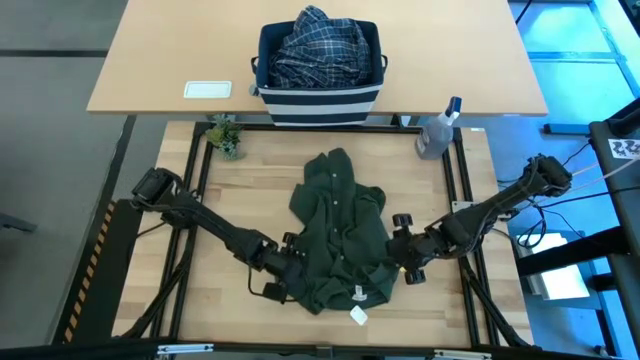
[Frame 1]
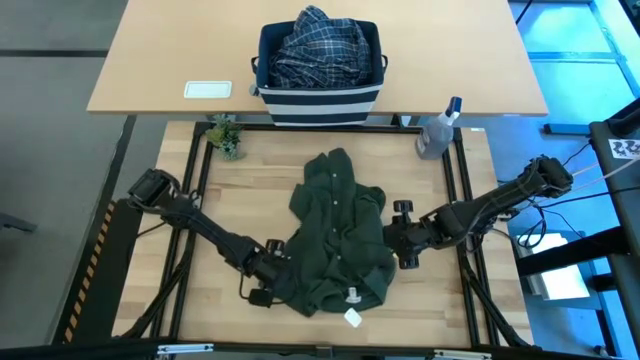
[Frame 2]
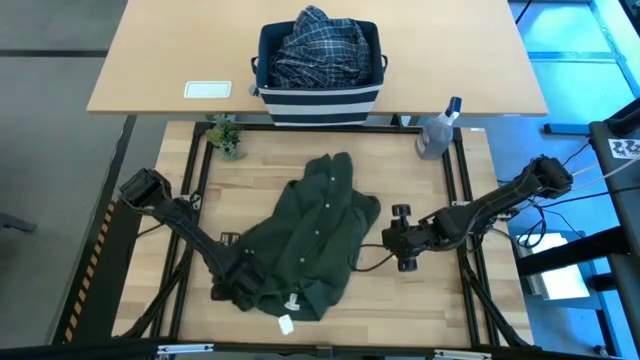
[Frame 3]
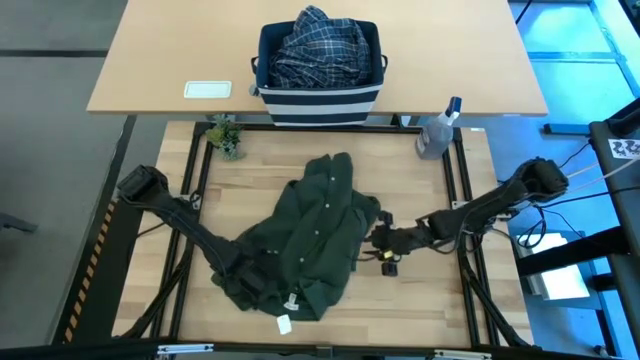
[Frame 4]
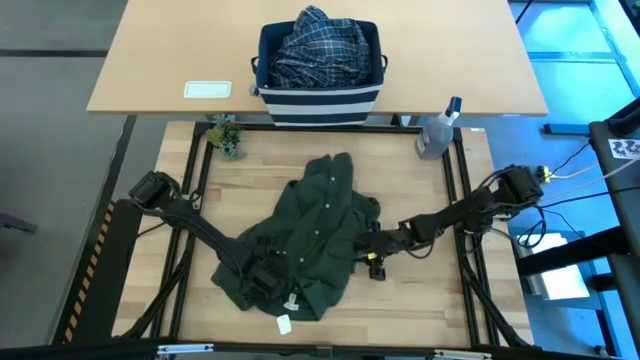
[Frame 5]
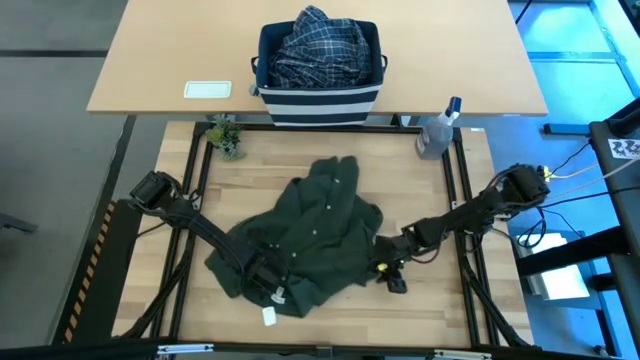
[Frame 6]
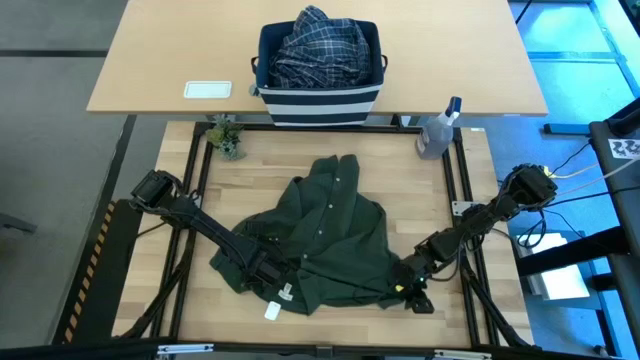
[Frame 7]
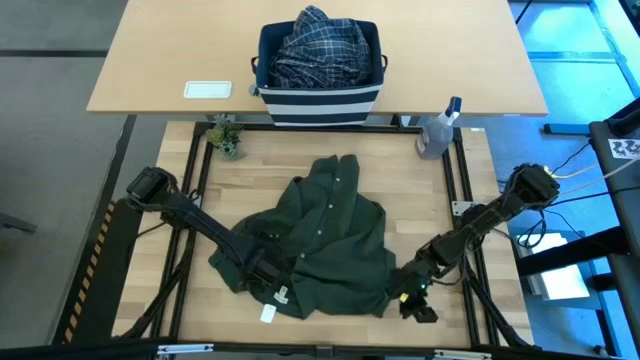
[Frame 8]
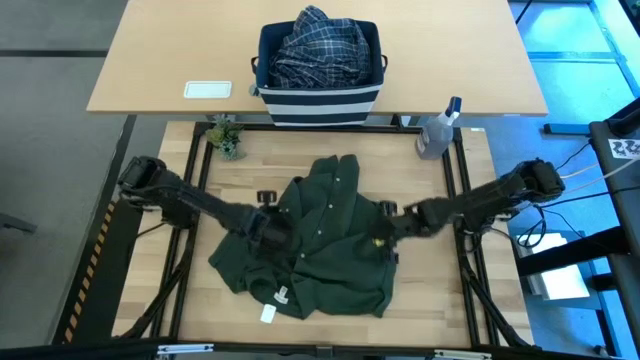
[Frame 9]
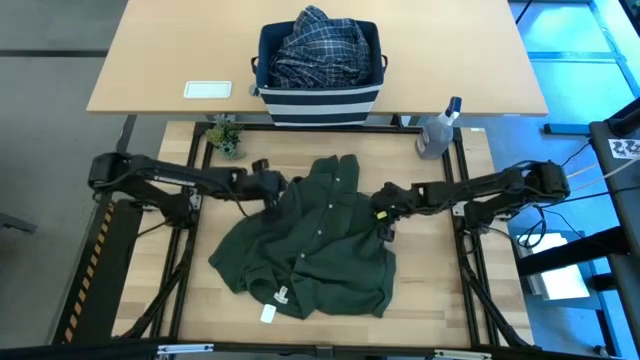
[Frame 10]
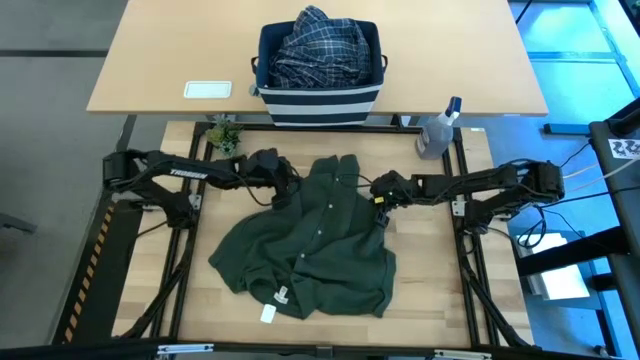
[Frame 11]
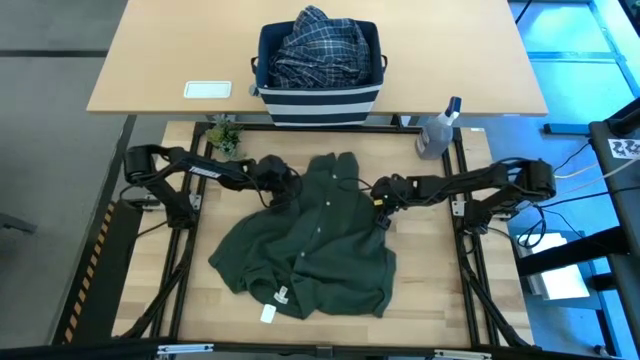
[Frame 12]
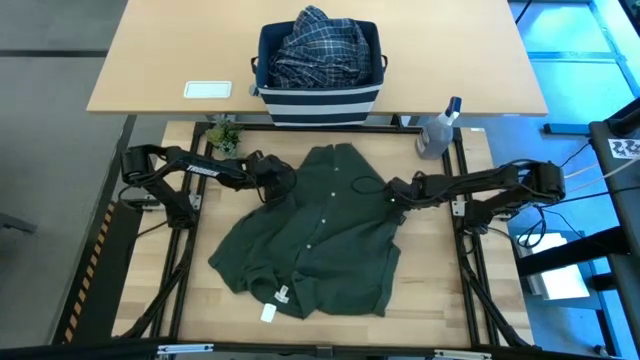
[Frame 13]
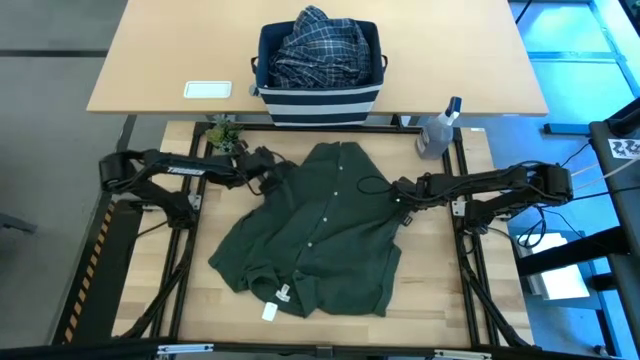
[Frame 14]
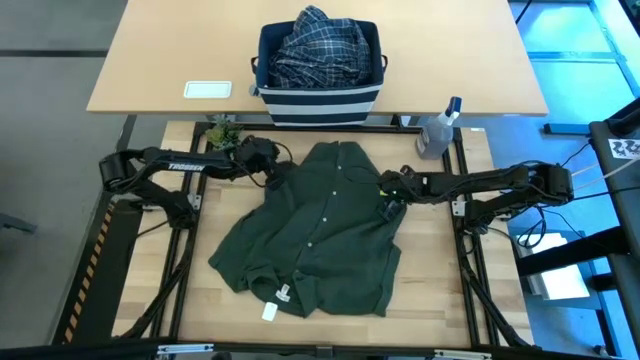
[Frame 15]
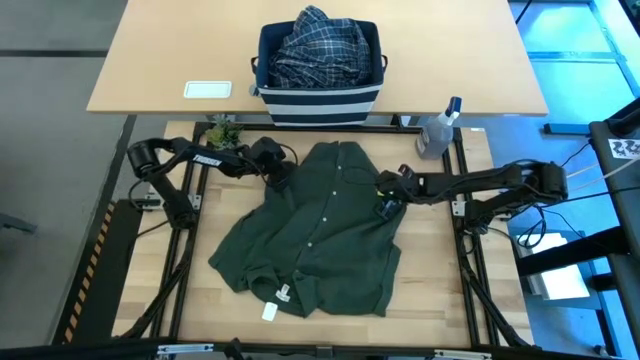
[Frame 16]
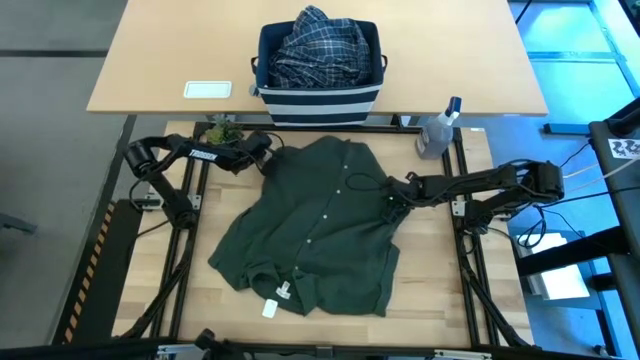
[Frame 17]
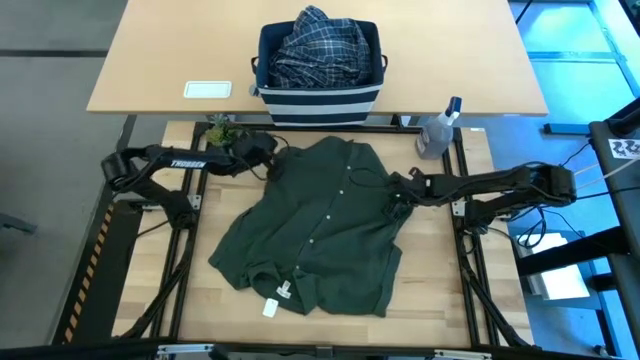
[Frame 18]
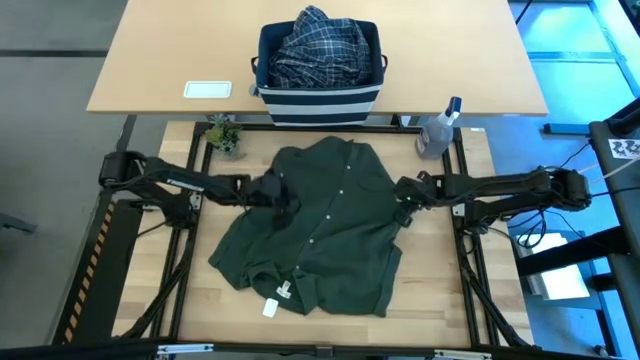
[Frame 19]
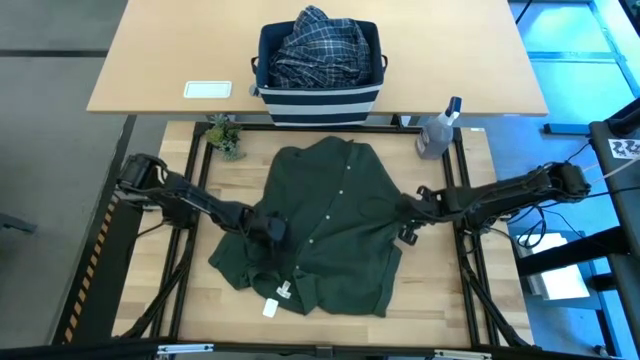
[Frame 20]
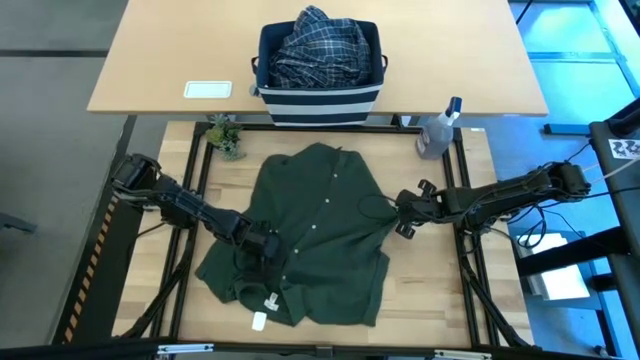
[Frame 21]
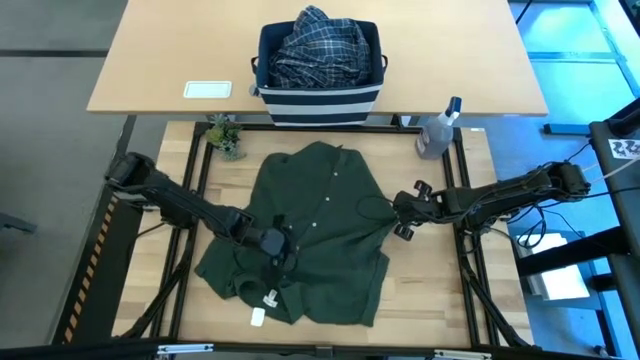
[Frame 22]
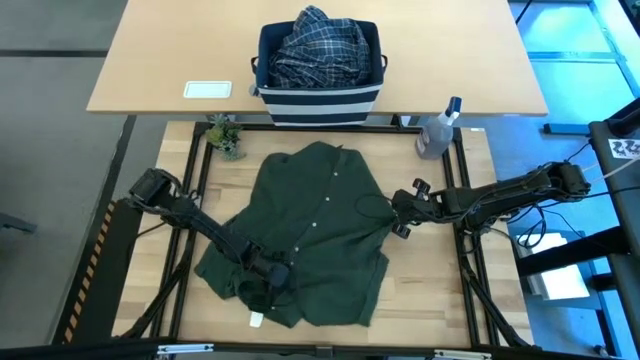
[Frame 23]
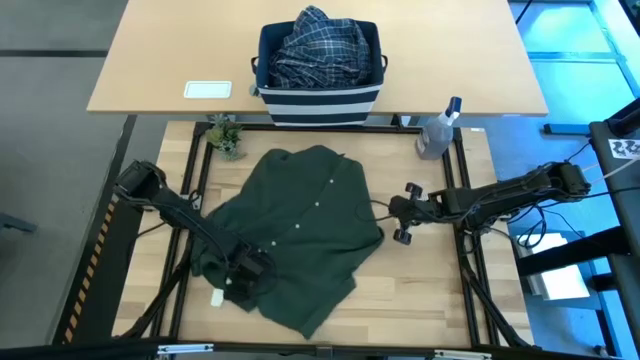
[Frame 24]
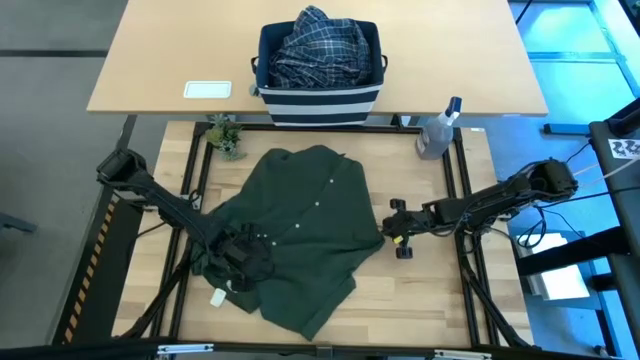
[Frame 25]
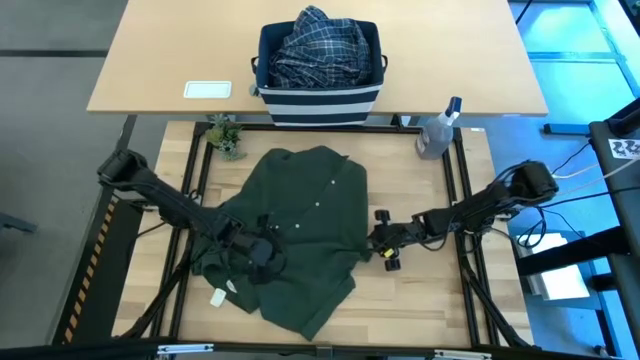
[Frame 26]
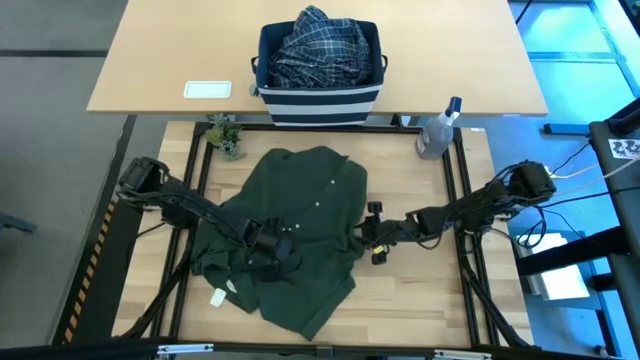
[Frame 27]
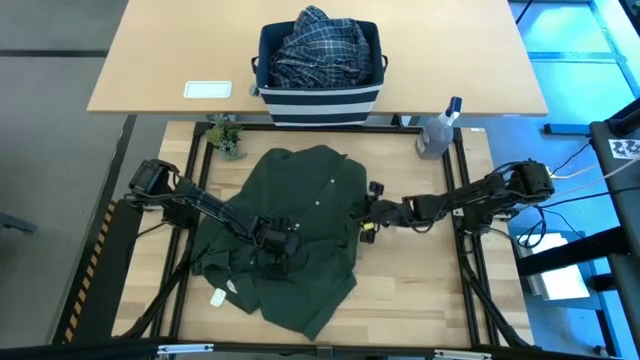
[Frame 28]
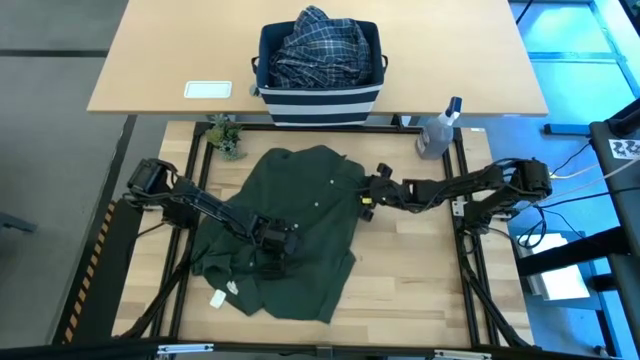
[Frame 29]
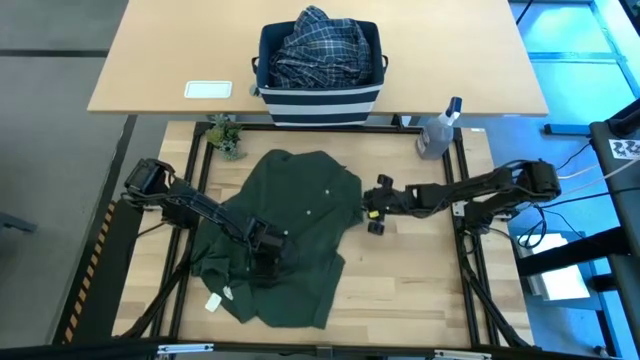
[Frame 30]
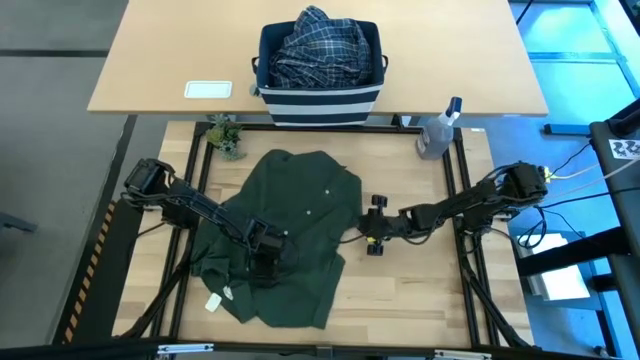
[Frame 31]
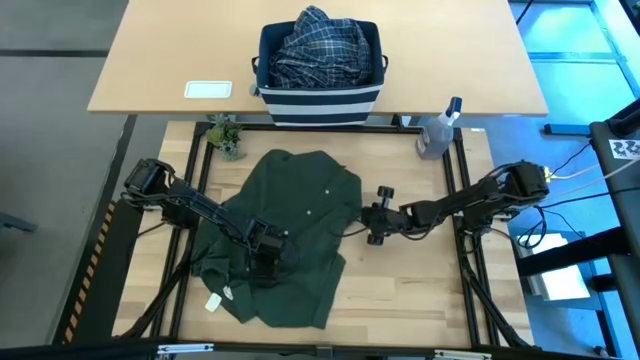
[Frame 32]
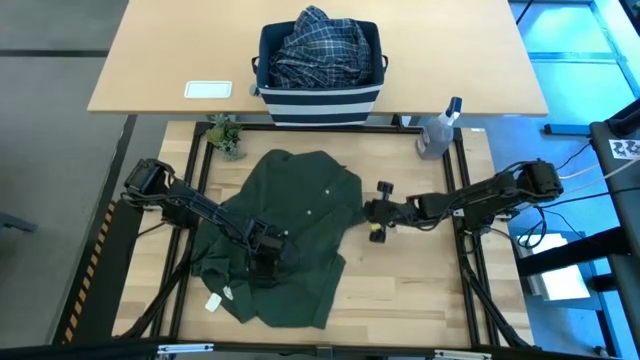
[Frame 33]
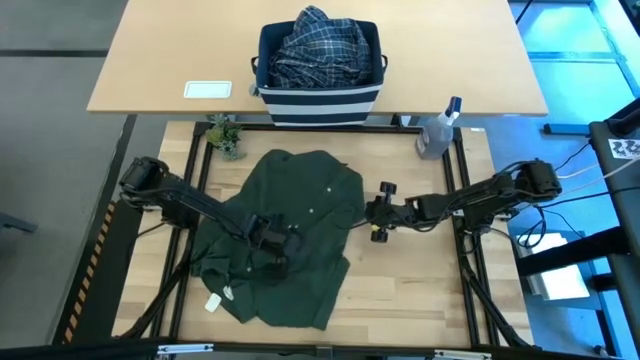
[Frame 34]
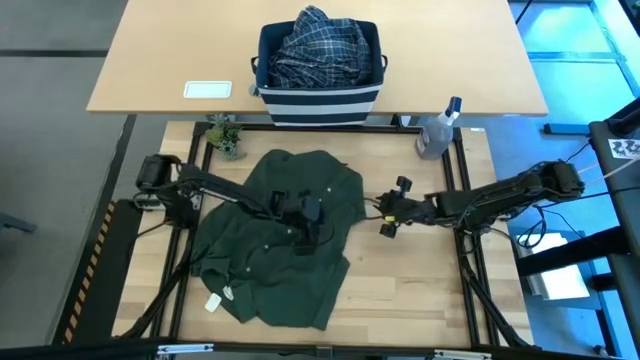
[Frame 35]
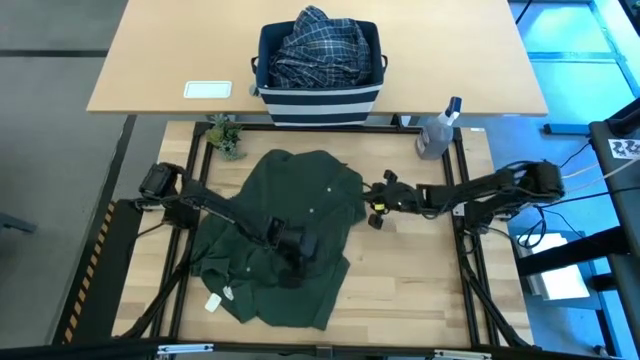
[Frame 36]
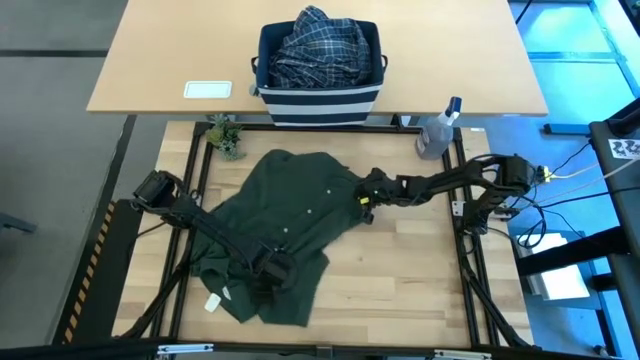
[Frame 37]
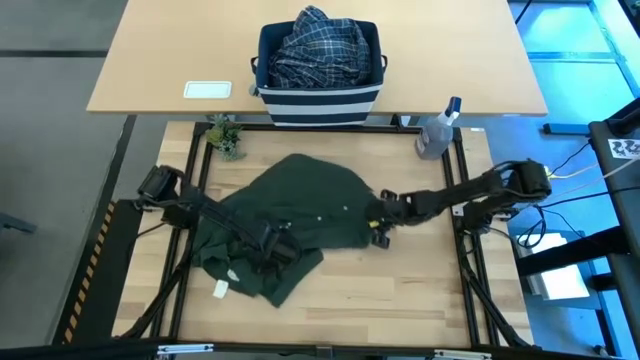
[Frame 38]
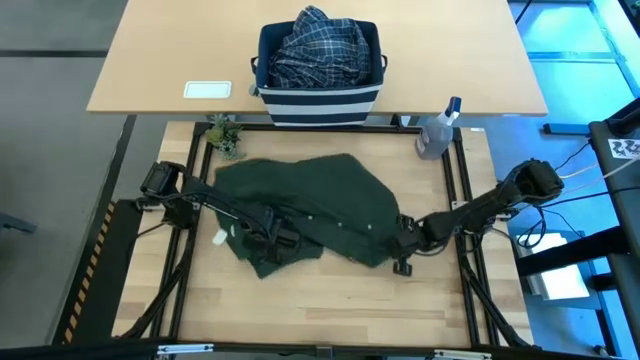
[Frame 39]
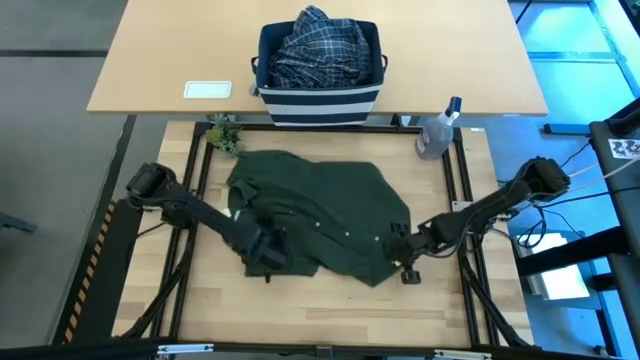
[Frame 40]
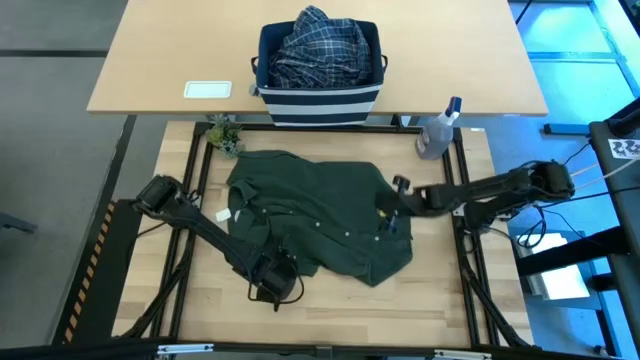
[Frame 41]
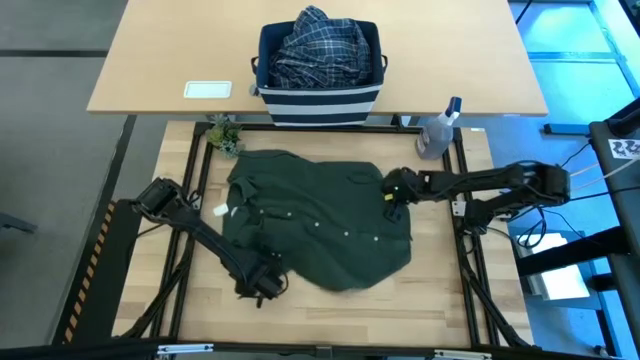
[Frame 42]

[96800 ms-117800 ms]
Task: Fold Laundry from Bin
Fold the green polo shirt
